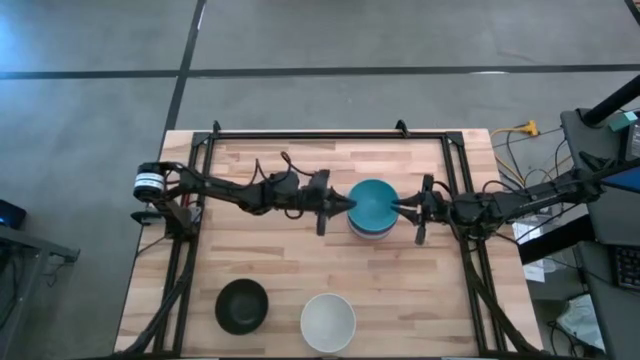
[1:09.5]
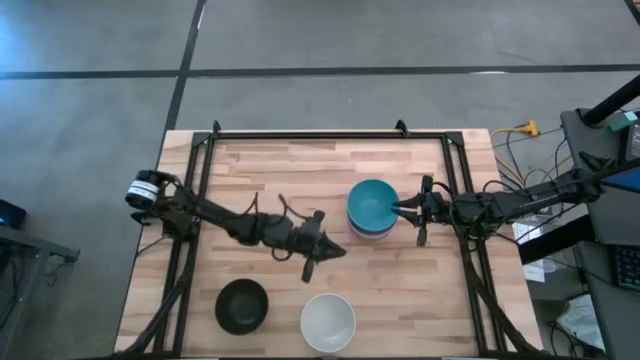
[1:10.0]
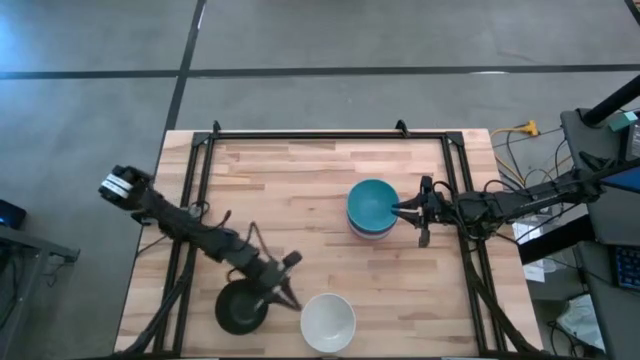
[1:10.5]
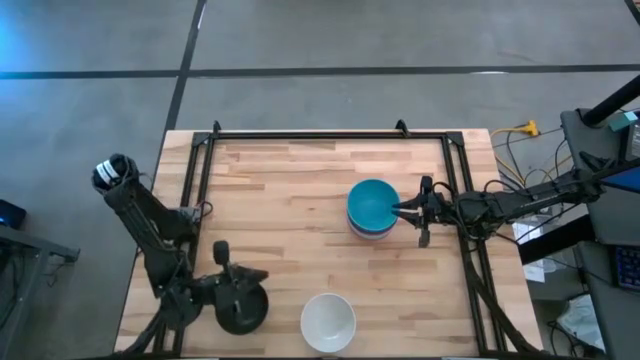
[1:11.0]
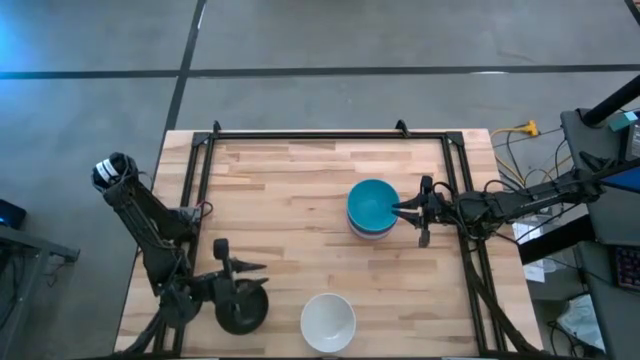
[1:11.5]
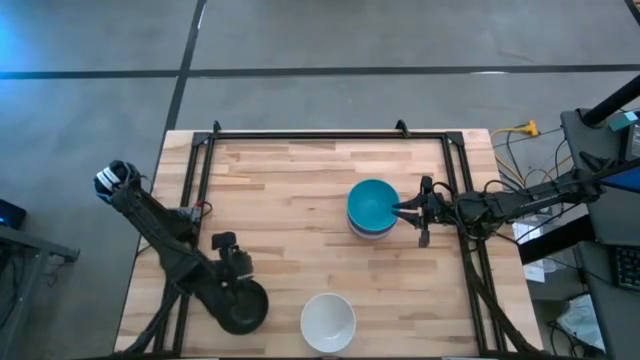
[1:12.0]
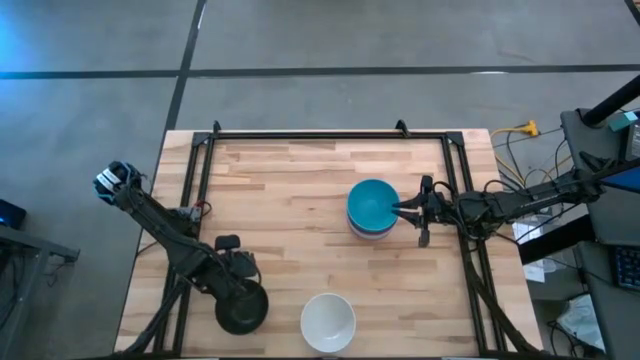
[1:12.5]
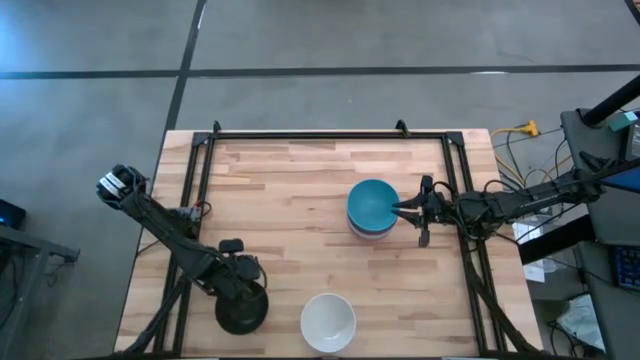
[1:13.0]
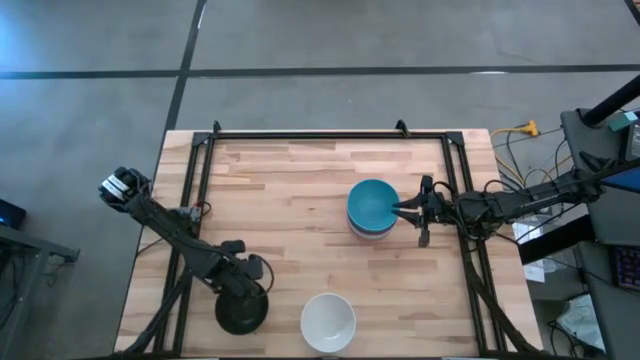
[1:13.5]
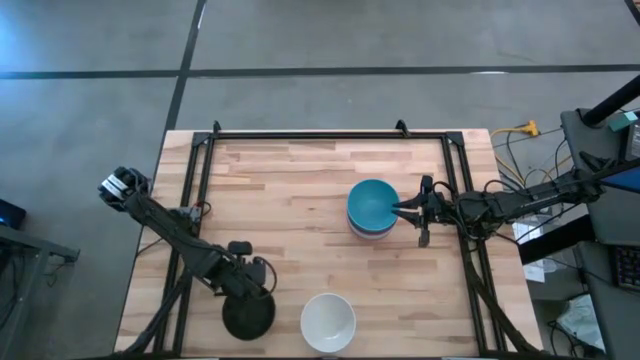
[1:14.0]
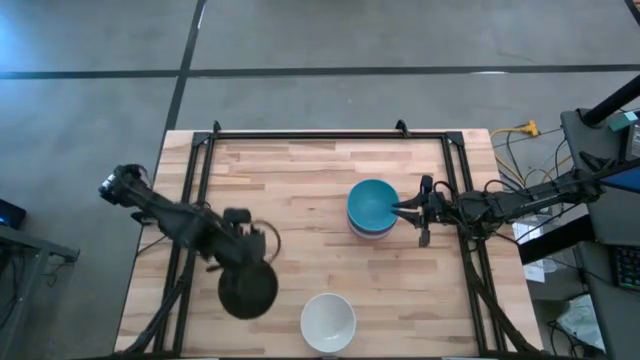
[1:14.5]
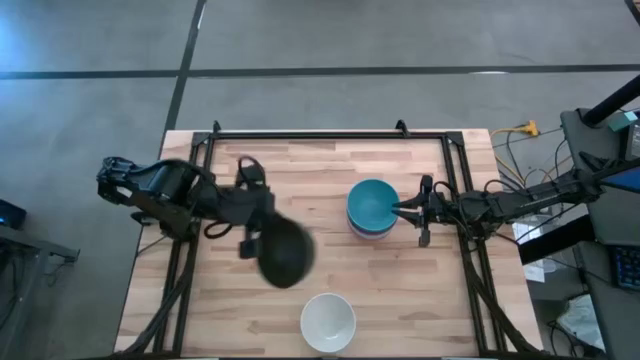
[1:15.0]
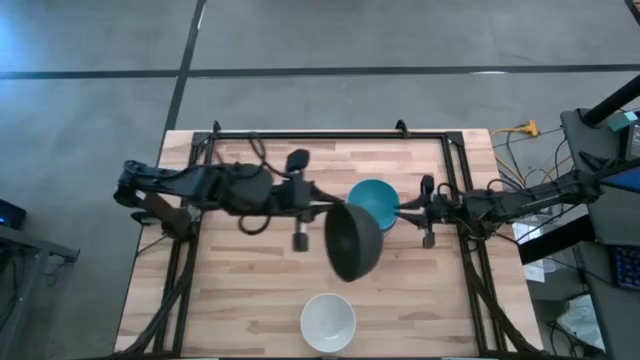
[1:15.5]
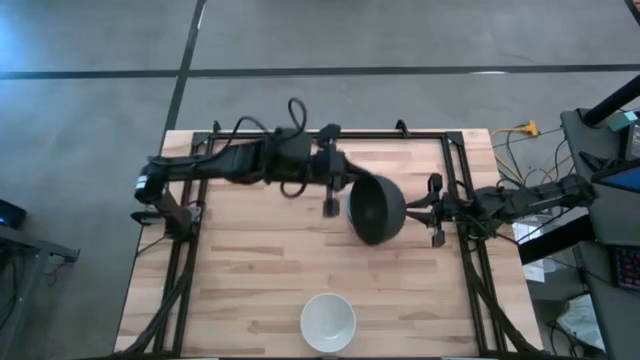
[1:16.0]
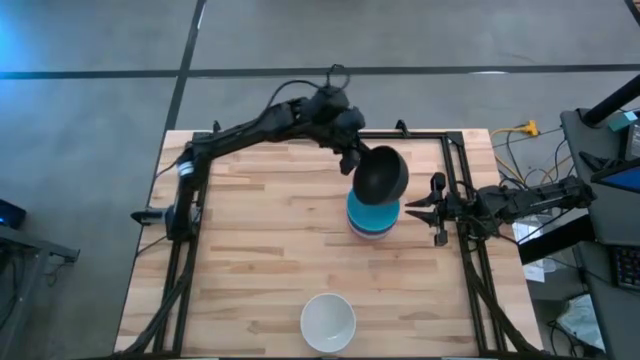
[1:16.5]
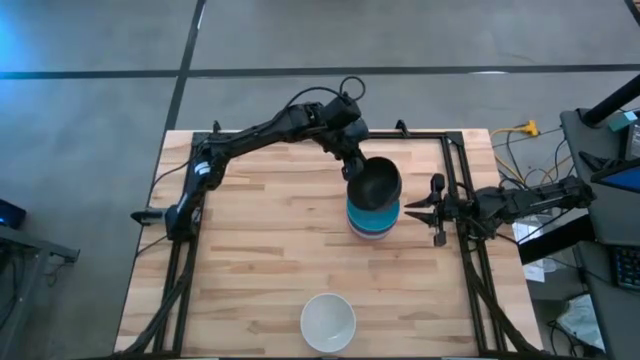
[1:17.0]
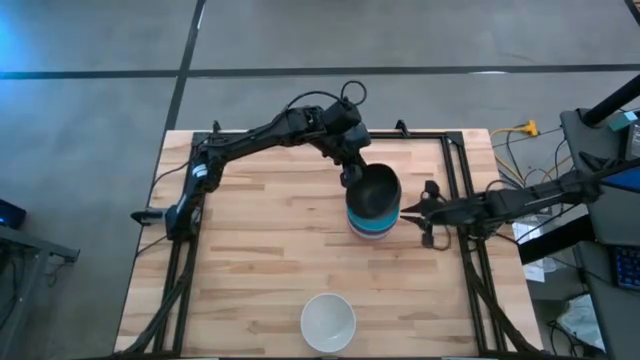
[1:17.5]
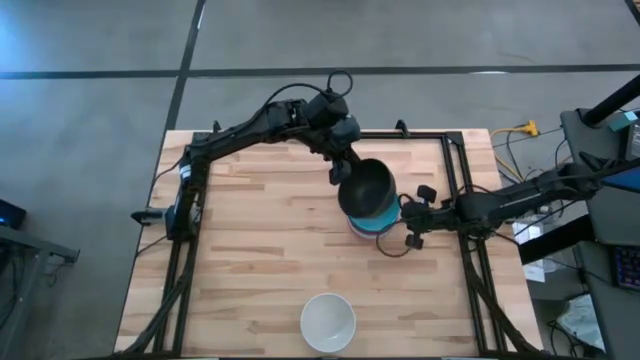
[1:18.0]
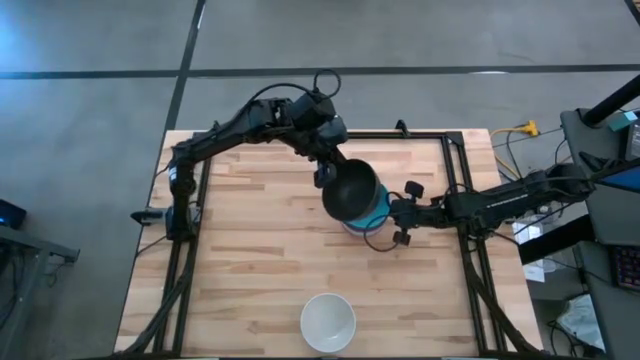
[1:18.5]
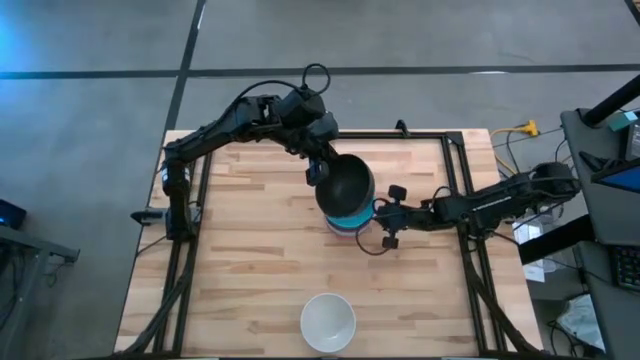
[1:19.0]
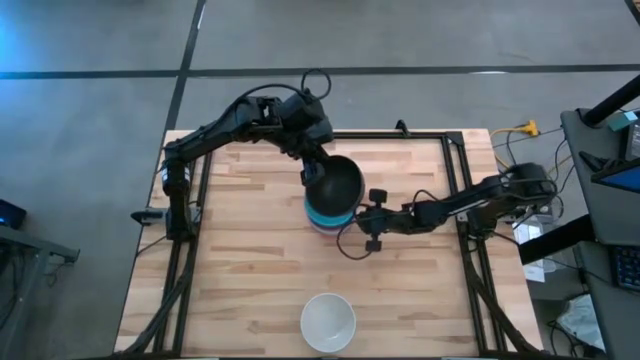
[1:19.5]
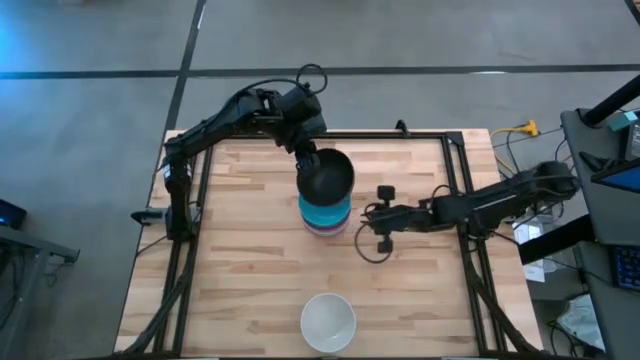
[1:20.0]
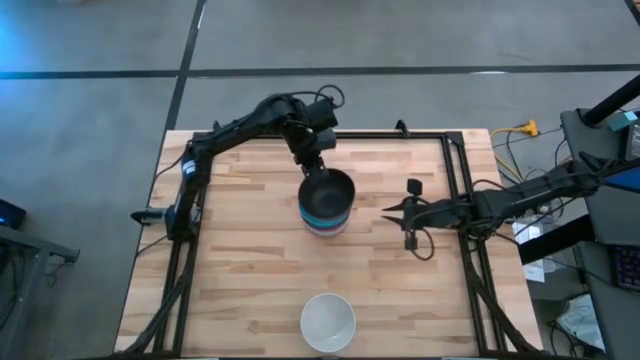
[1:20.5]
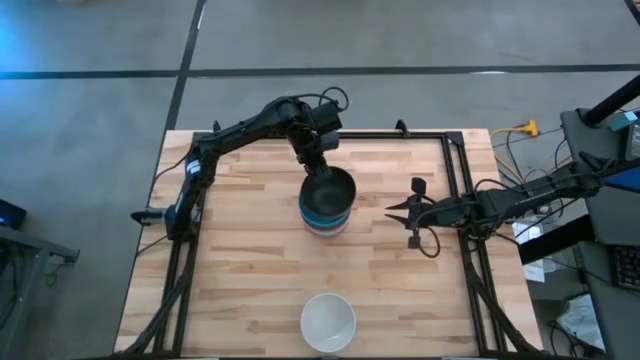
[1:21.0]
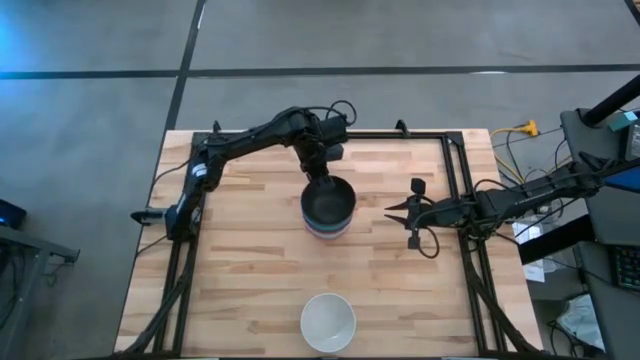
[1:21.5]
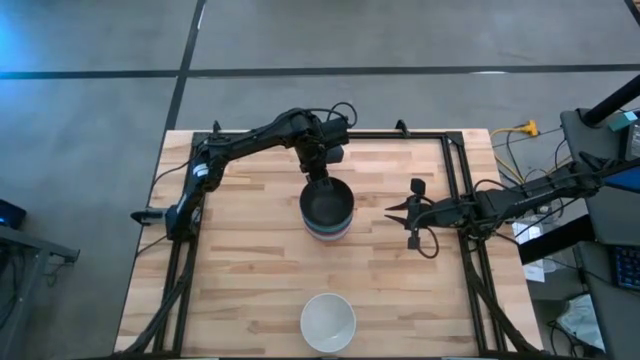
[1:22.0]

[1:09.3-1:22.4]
Task: Nest bowls inside each other
Stack the black bowl on the blue bowl

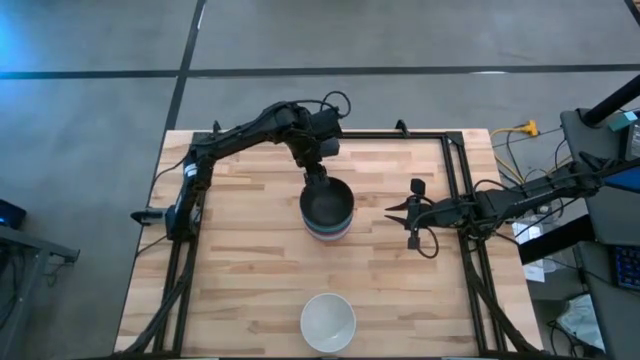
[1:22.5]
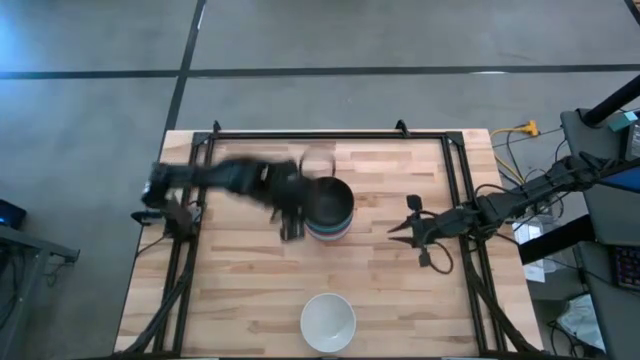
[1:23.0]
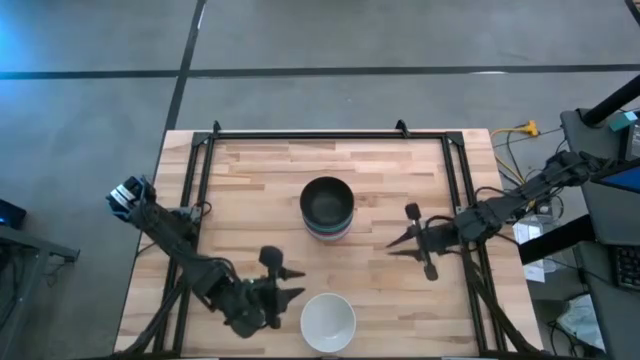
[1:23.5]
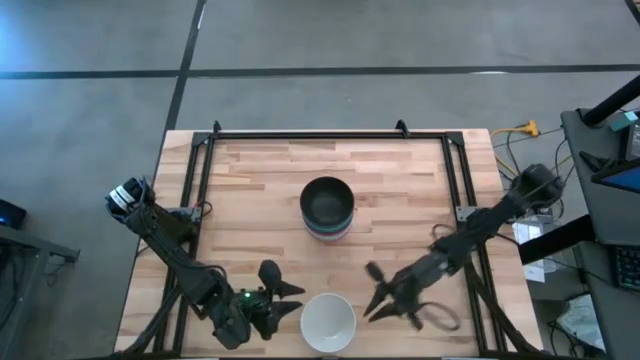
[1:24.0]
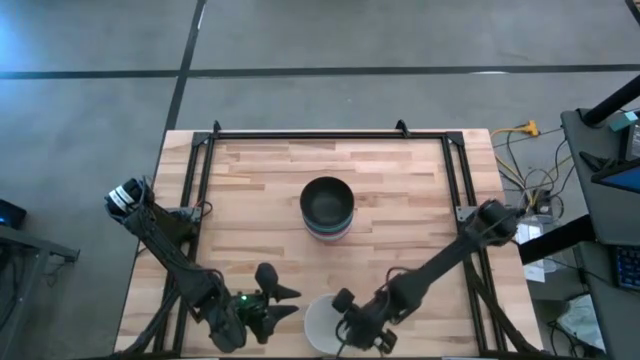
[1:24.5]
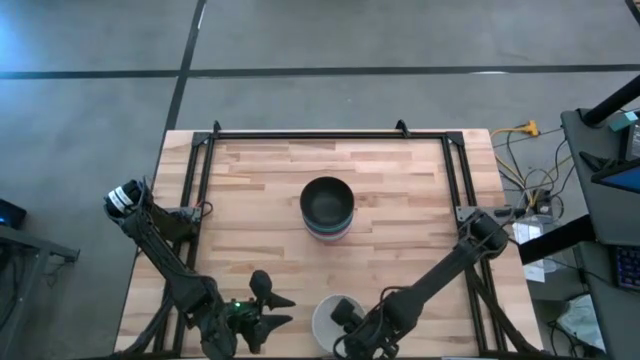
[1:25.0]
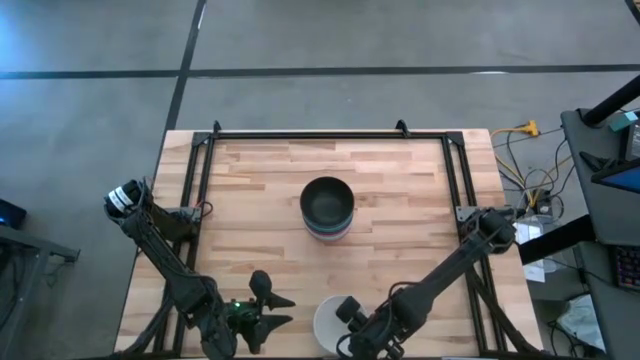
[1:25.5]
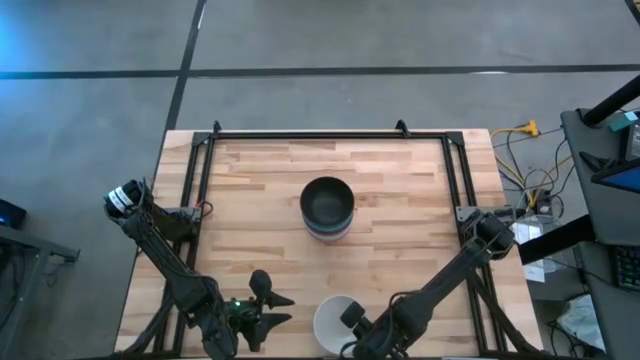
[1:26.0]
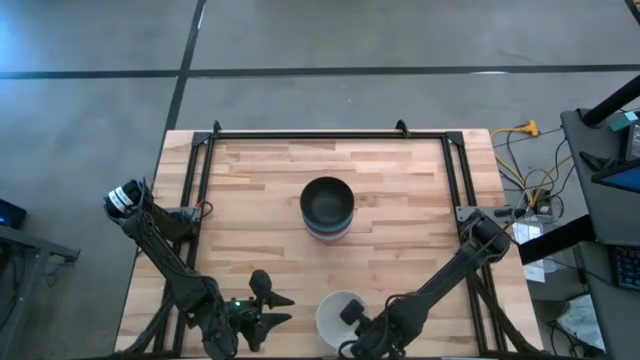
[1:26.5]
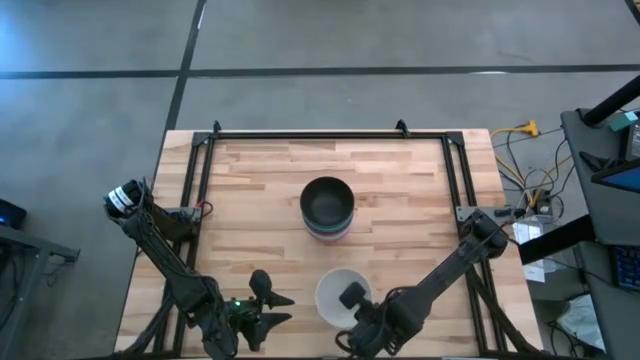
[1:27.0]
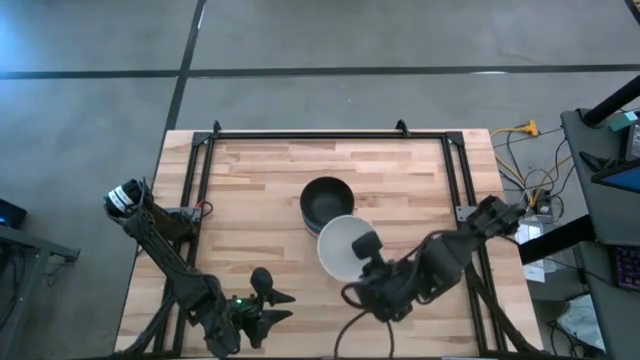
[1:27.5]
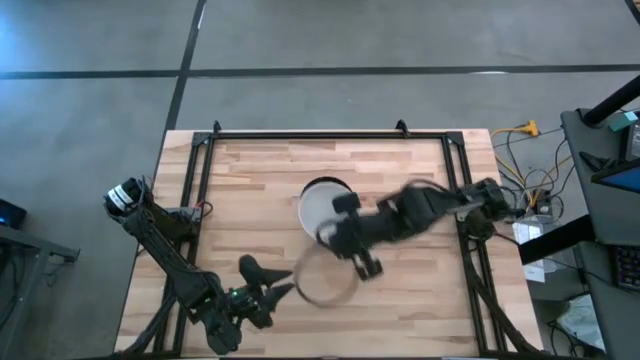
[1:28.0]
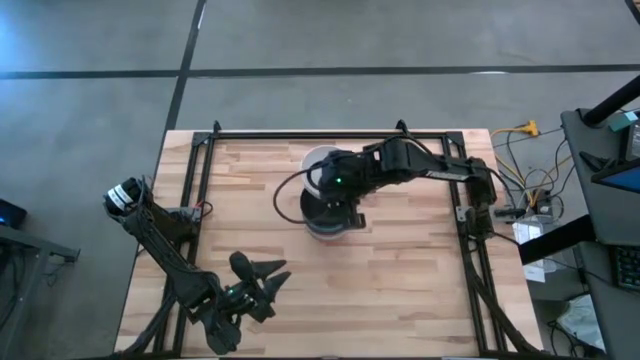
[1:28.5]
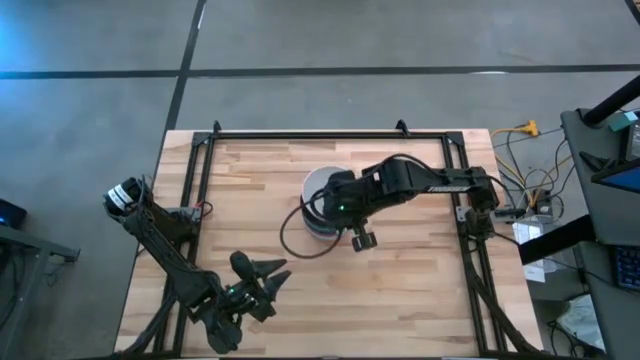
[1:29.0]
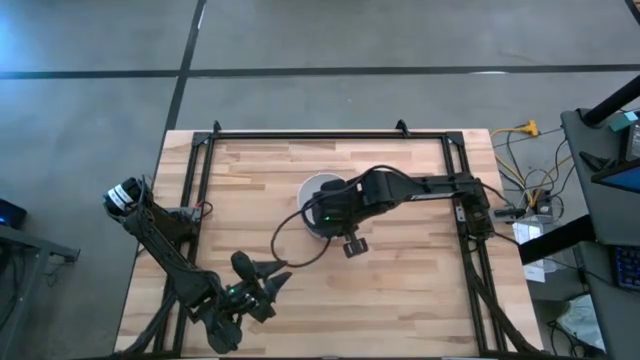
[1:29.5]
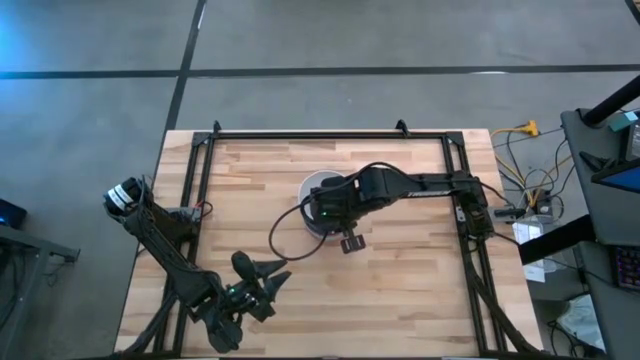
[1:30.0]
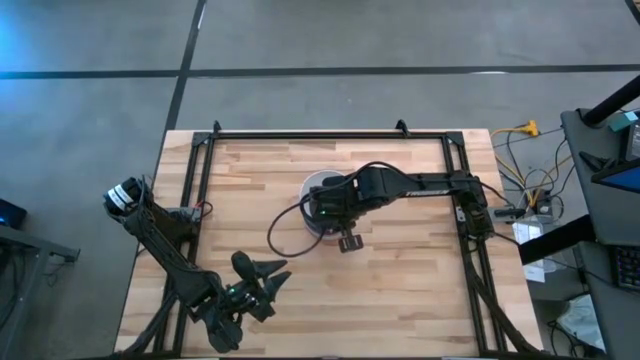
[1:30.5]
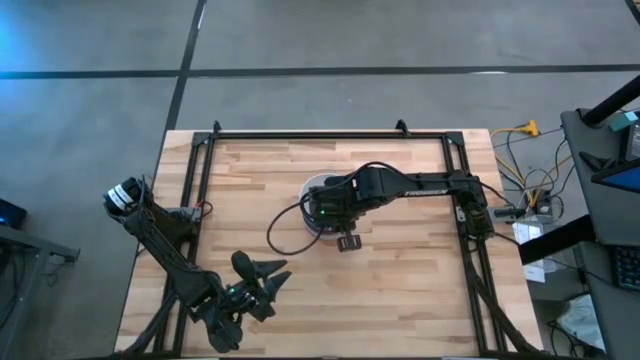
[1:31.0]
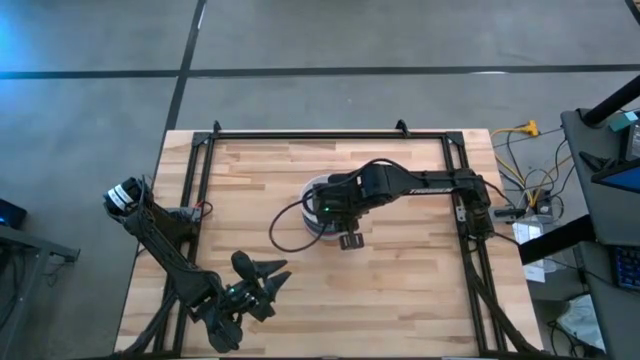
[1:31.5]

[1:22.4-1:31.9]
Stack the white bowl on the black bowl
